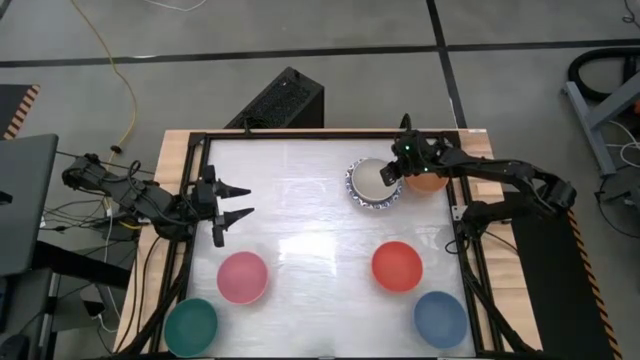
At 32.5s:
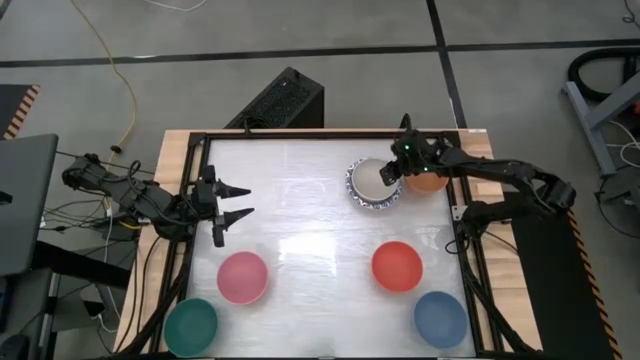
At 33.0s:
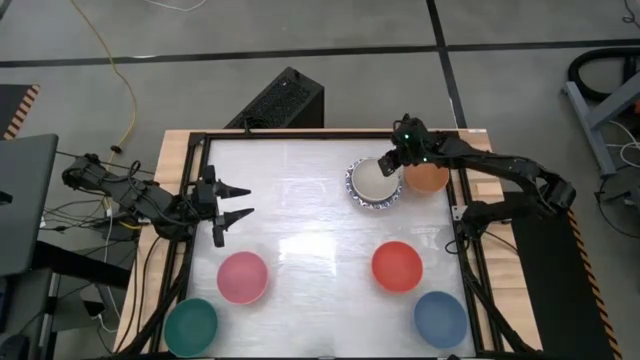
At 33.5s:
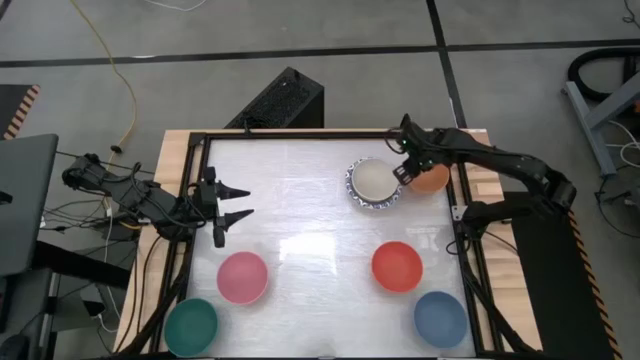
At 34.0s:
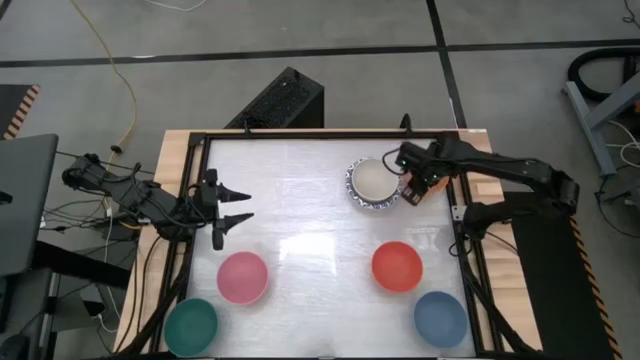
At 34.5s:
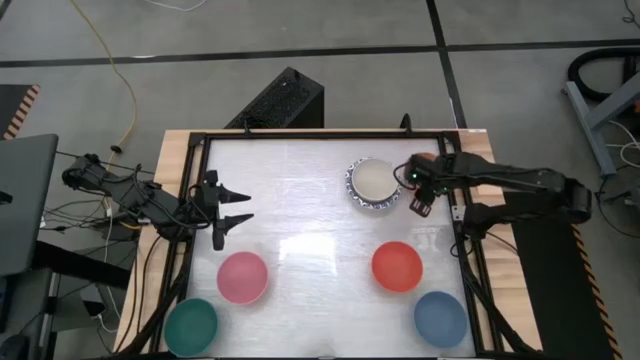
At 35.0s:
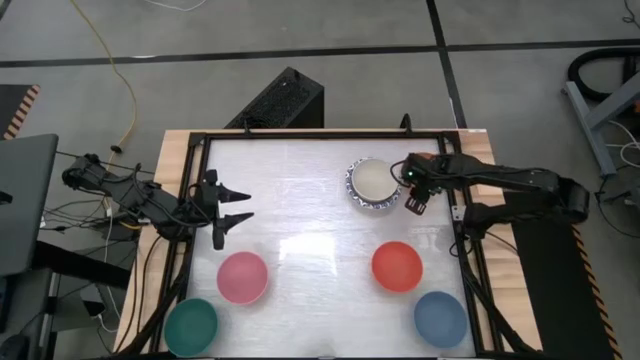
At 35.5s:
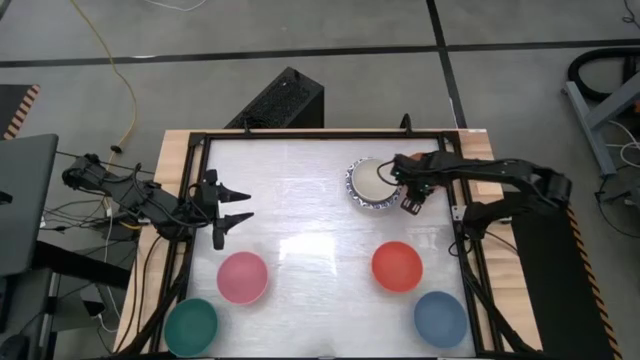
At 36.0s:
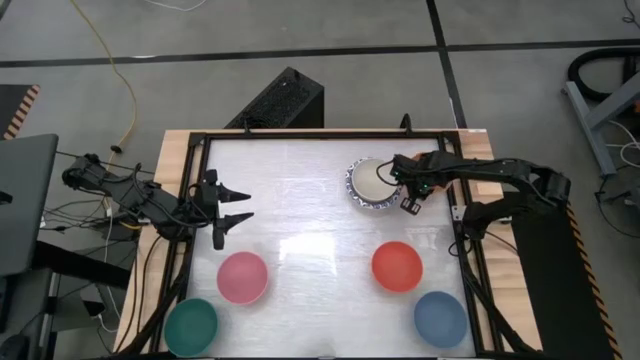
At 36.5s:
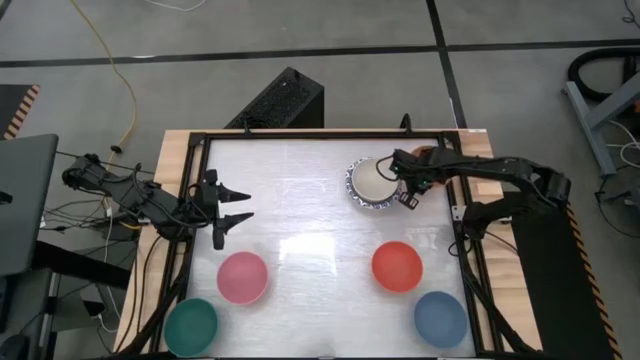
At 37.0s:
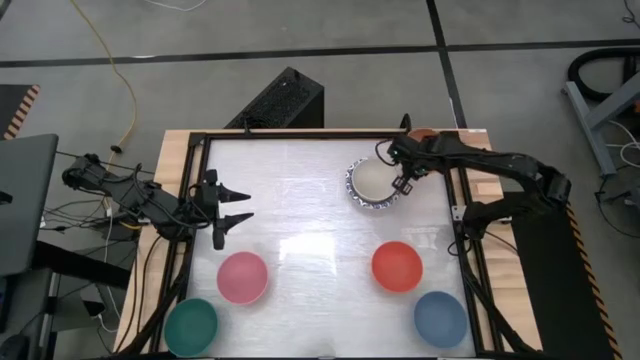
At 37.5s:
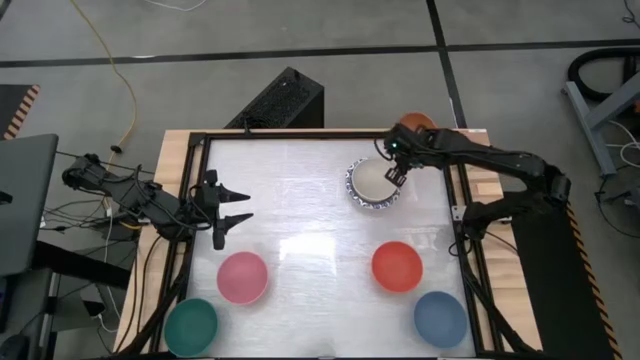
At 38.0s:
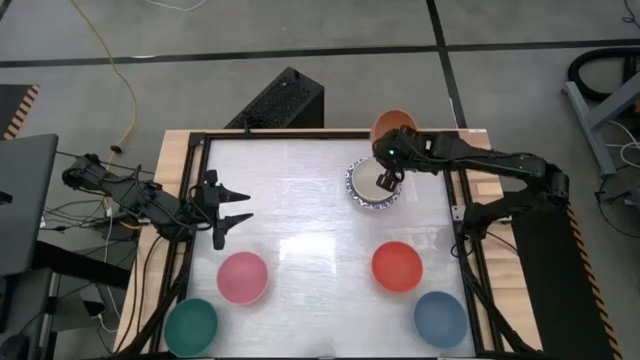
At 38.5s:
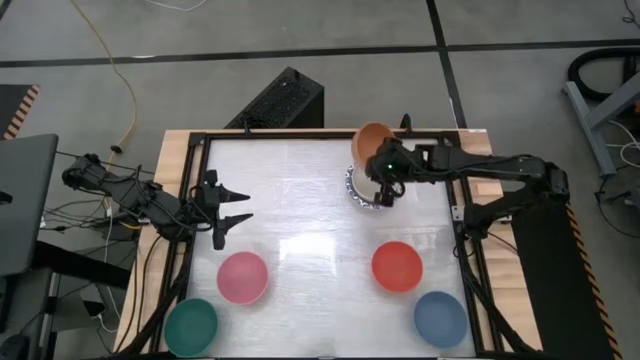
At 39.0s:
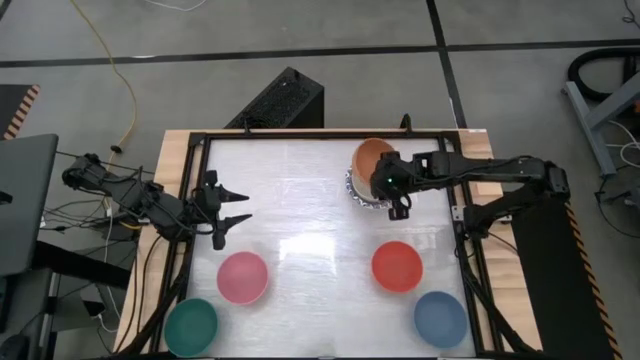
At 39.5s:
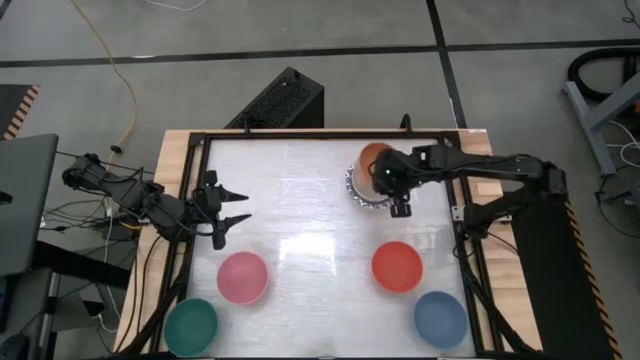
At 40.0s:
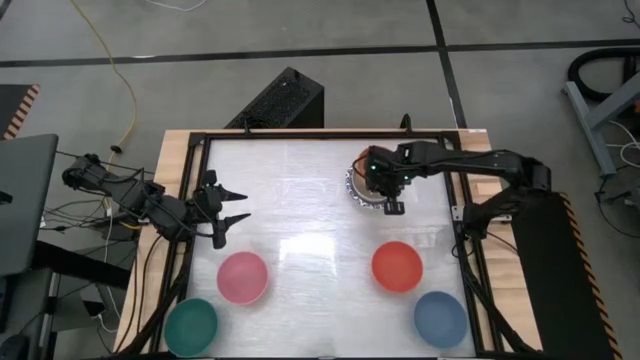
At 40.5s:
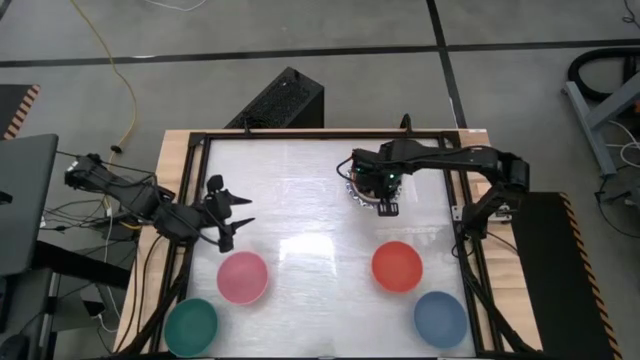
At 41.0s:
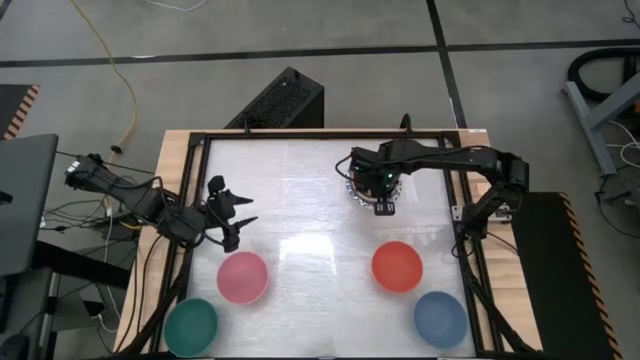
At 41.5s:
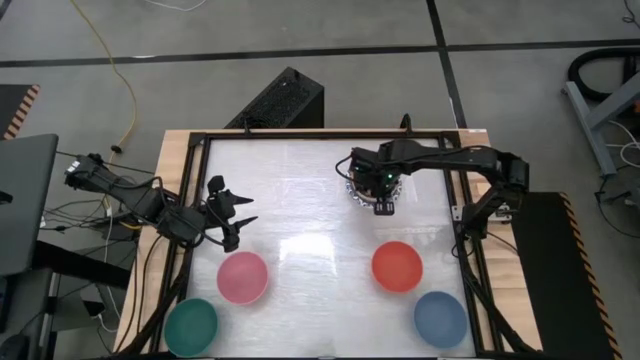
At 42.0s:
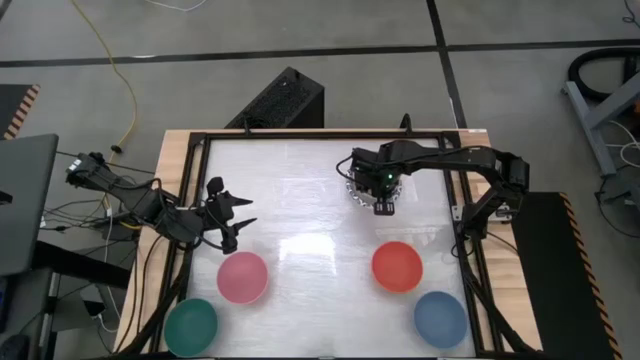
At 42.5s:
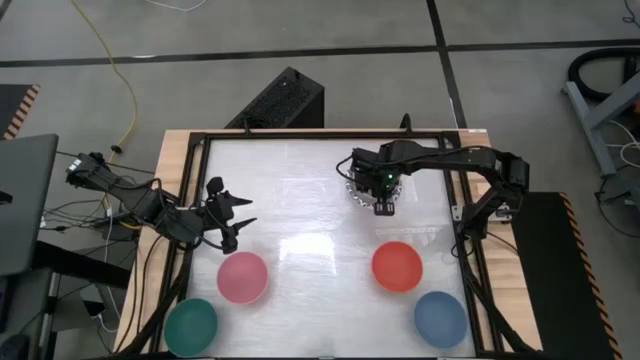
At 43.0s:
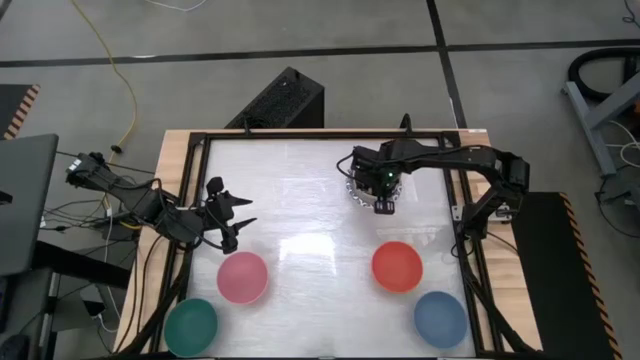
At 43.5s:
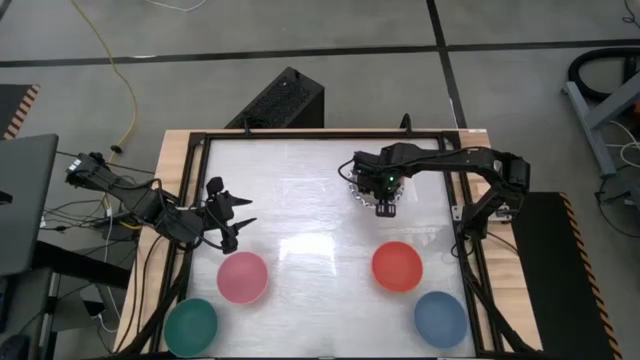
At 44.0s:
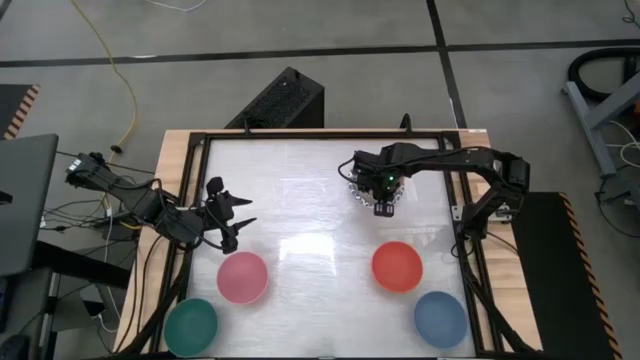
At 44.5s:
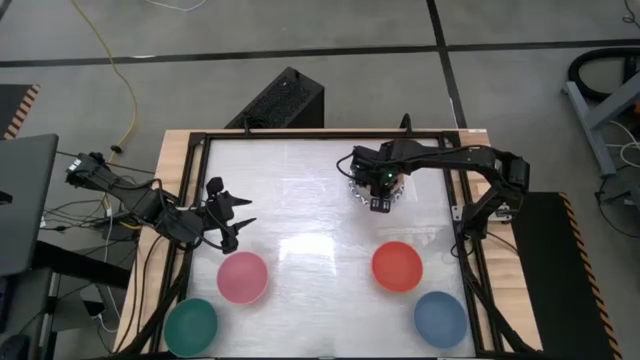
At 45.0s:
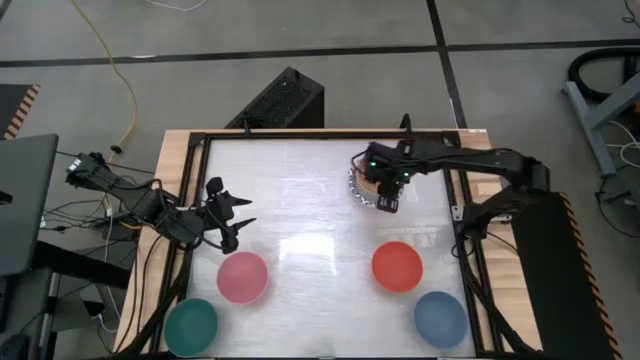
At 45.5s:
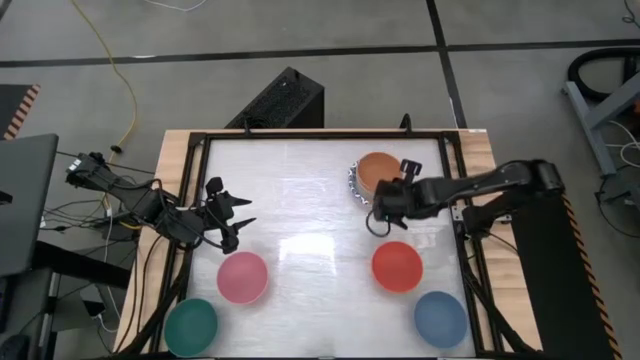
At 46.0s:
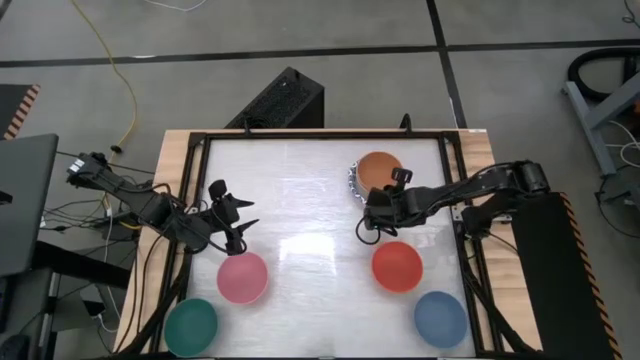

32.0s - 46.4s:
Stack the light orange bowl on top of the gray bowl
